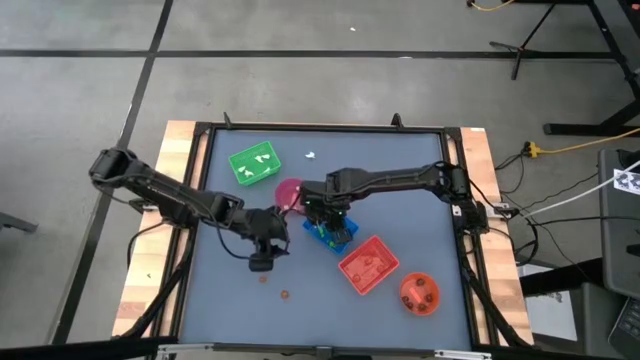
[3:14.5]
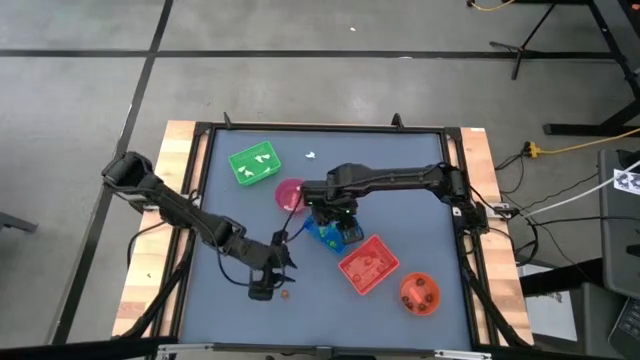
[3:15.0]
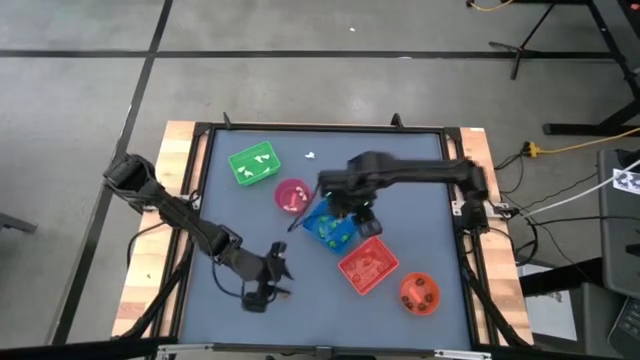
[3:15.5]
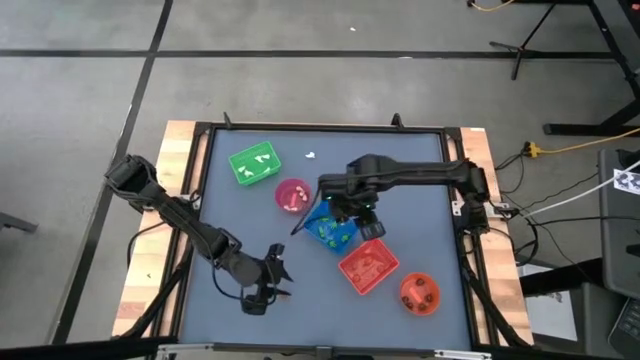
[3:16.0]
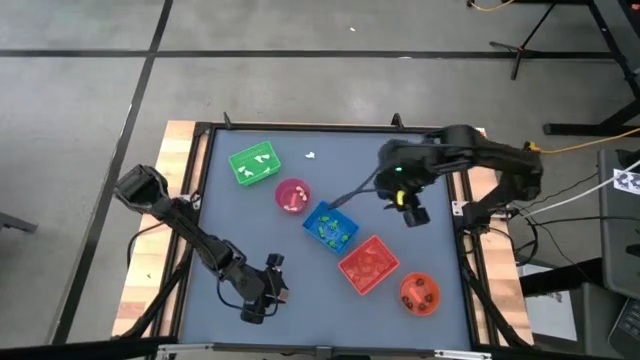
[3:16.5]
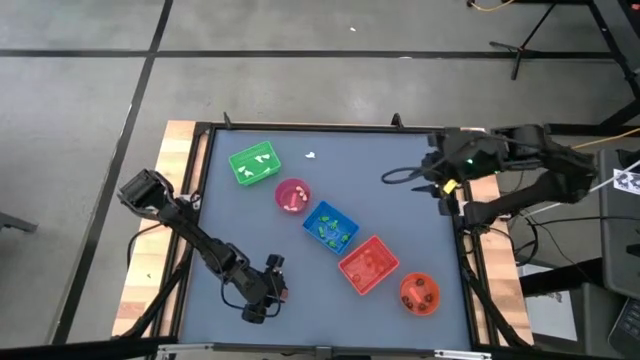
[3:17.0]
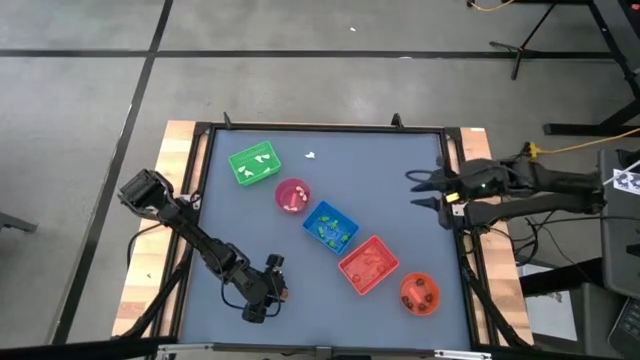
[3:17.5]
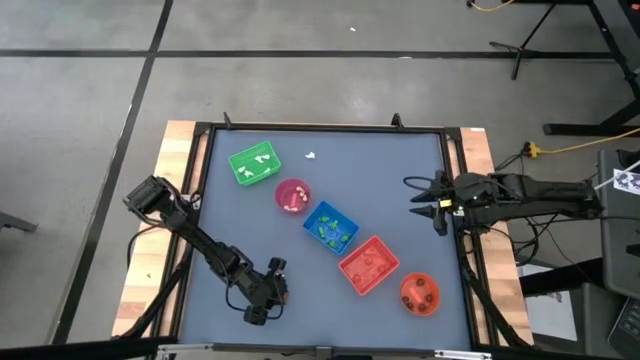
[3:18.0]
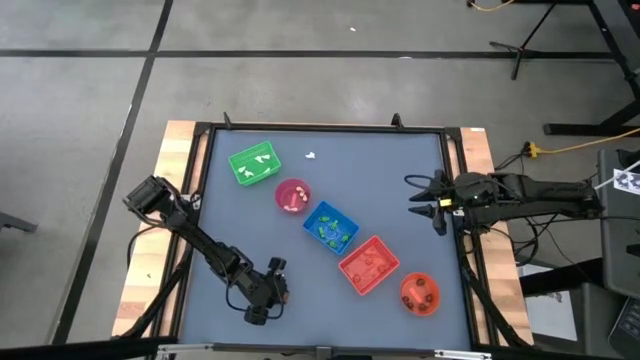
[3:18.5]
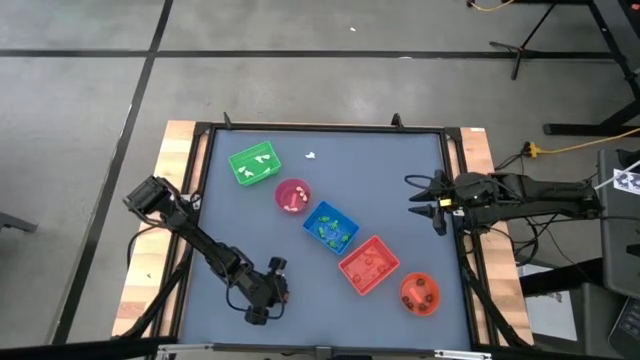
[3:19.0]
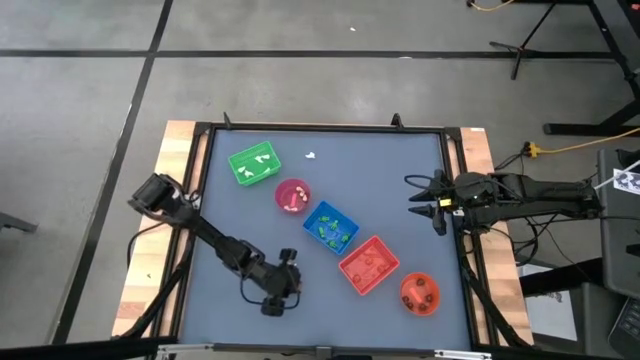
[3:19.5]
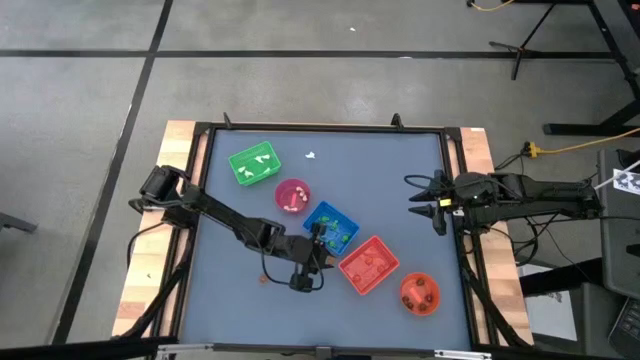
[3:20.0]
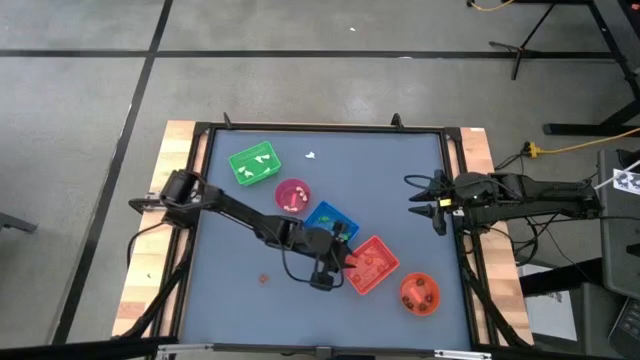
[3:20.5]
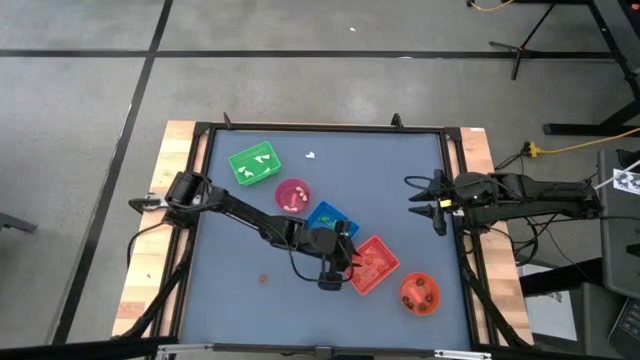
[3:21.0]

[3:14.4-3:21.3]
Task: Sort Halloween decoration
Put the orange pumpkin toy into the orange bin

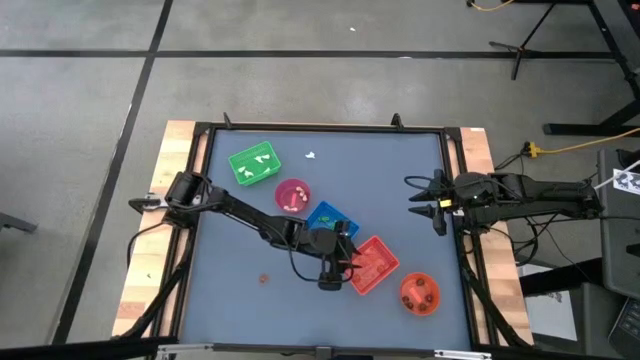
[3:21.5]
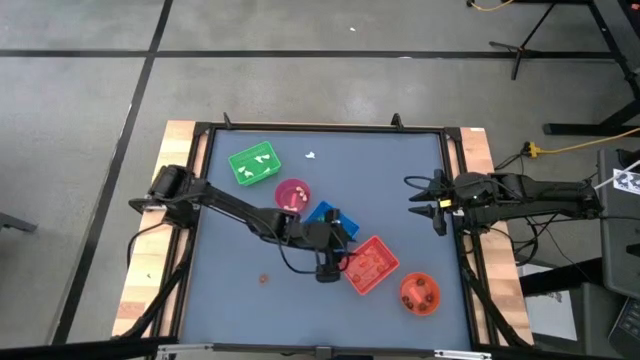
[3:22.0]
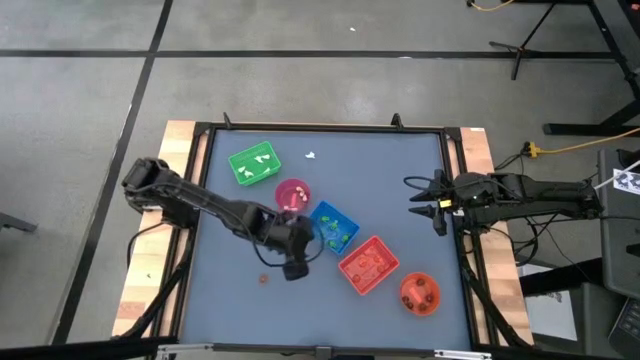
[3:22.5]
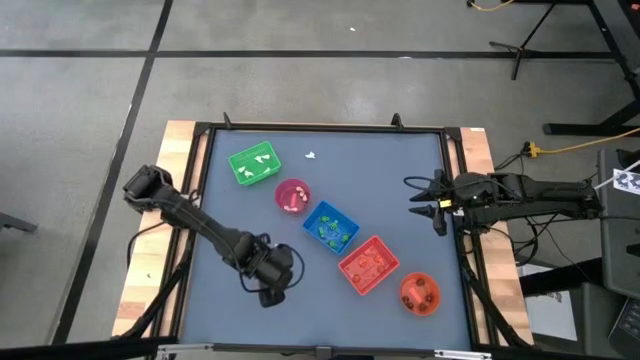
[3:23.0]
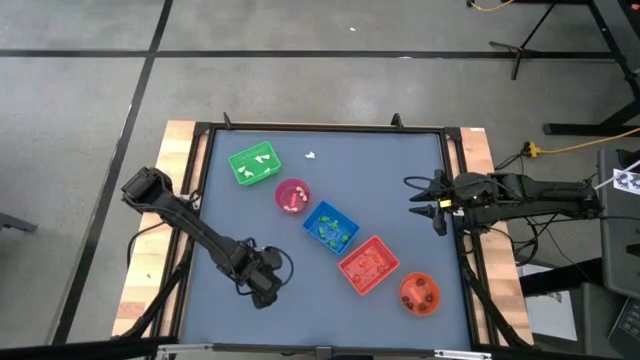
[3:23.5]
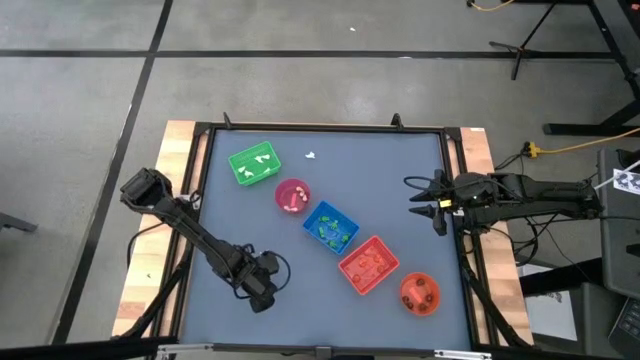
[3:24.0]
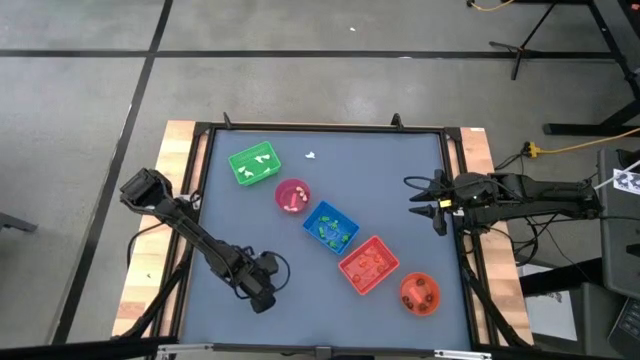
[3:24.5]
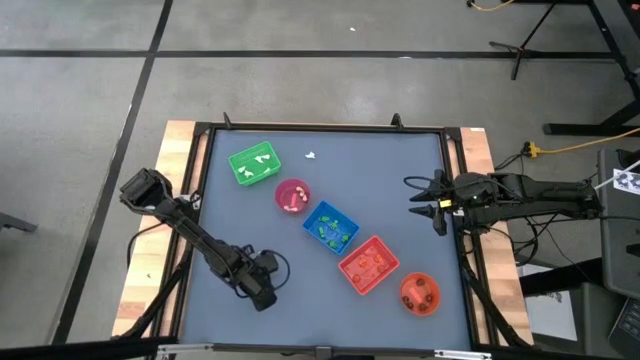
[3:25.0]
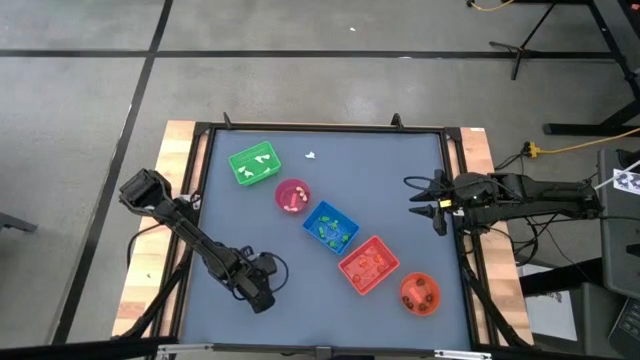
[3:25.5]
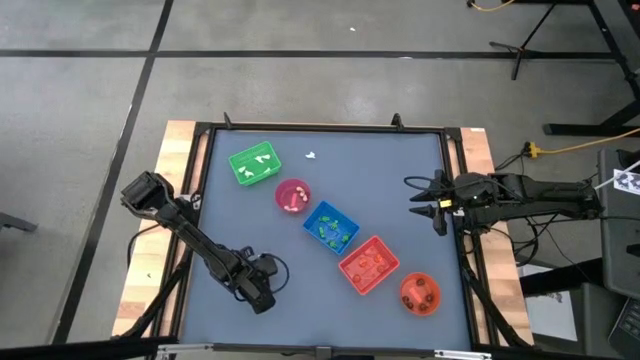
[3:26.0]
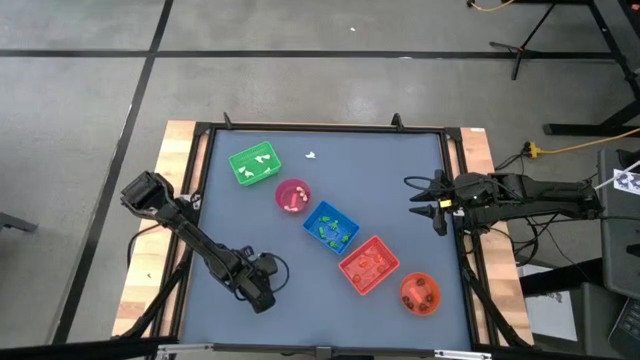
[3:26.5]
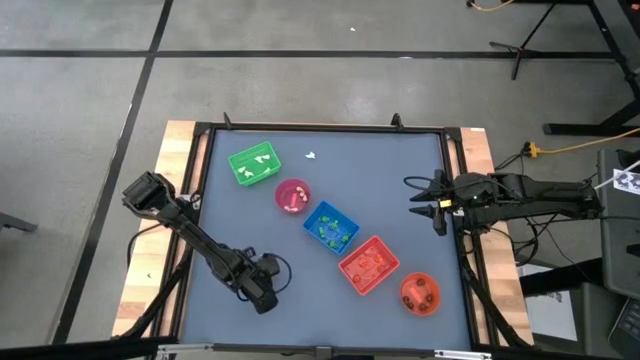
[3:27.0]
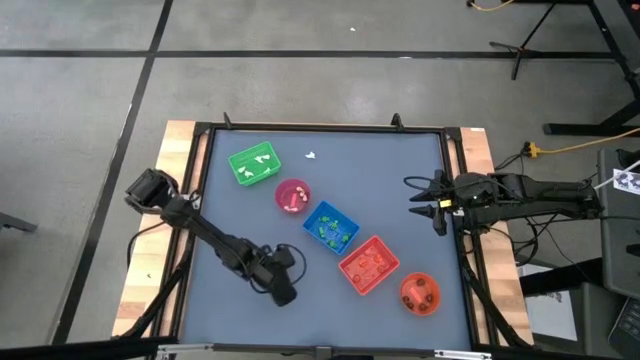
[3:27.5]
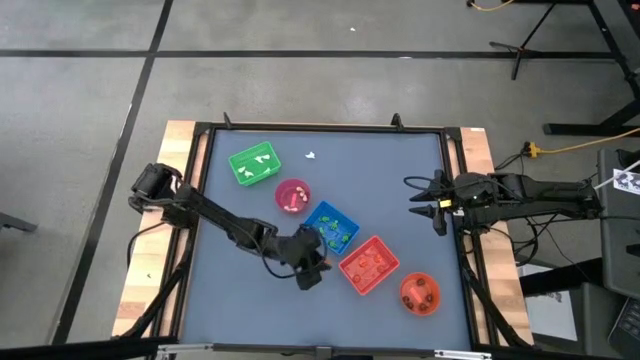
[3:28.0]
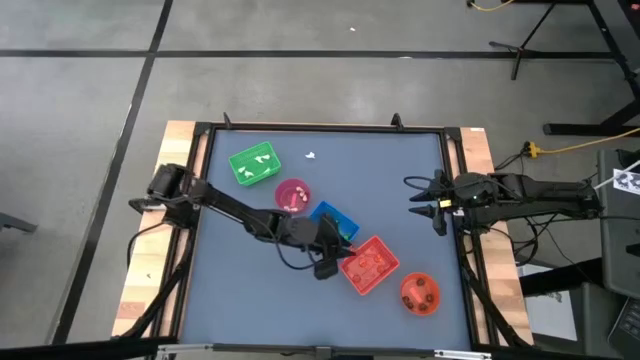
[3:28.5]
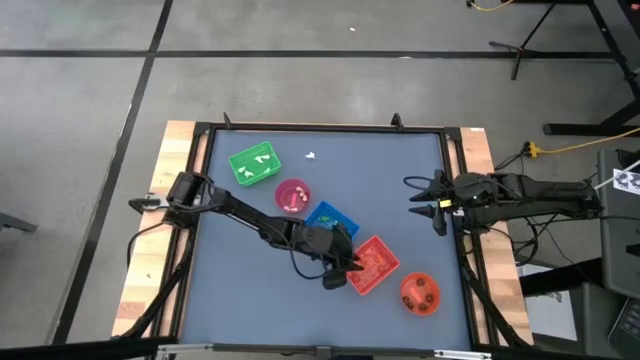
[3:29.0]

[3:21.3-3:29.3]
Put the orange pumpkin toy into the orange bin

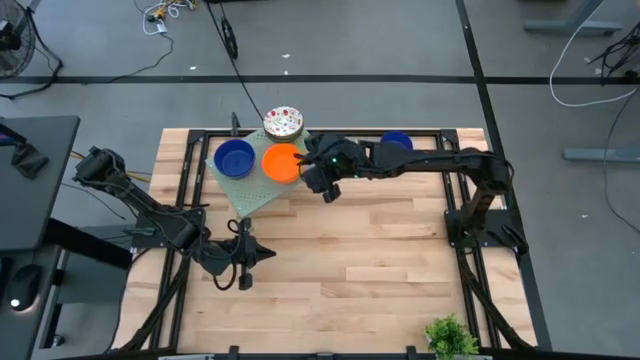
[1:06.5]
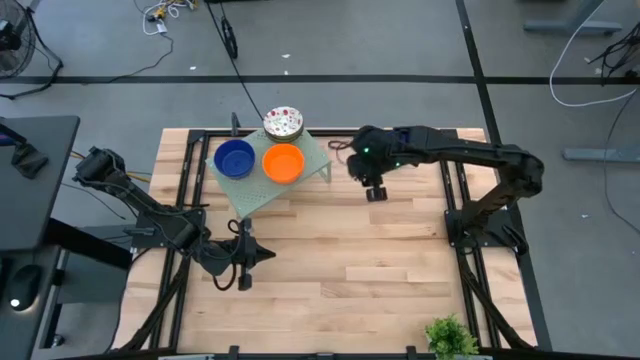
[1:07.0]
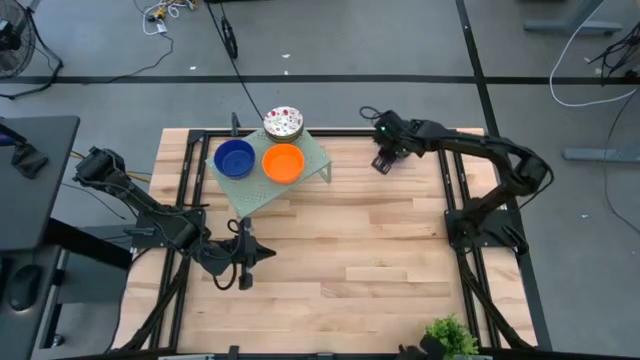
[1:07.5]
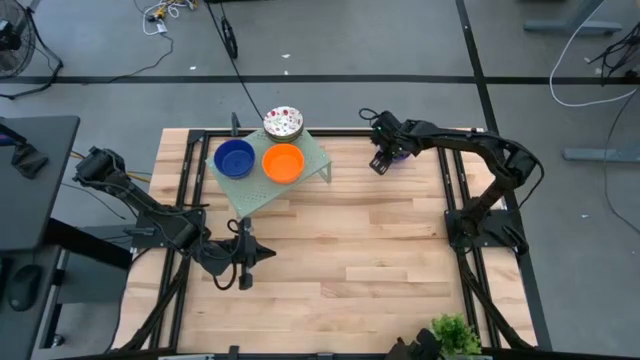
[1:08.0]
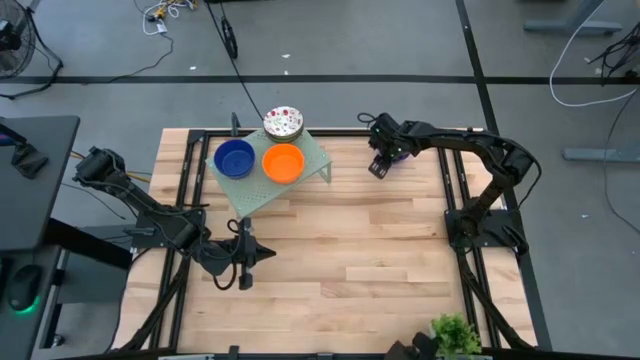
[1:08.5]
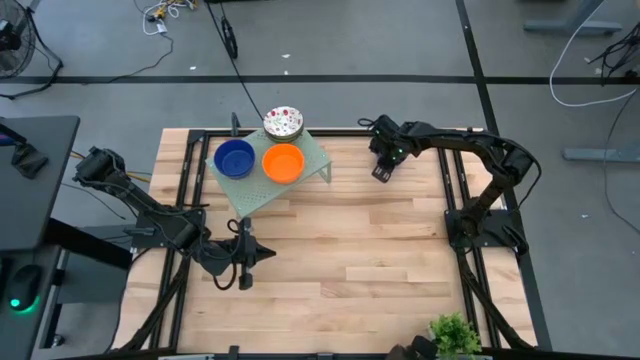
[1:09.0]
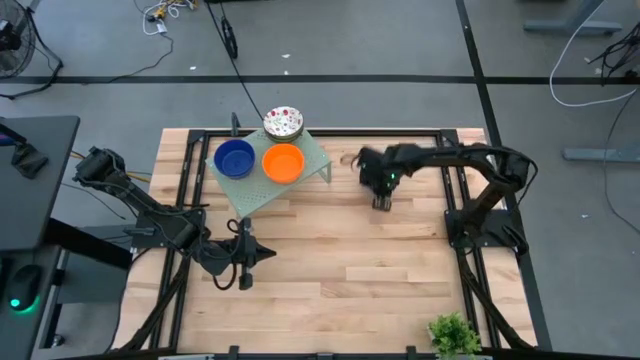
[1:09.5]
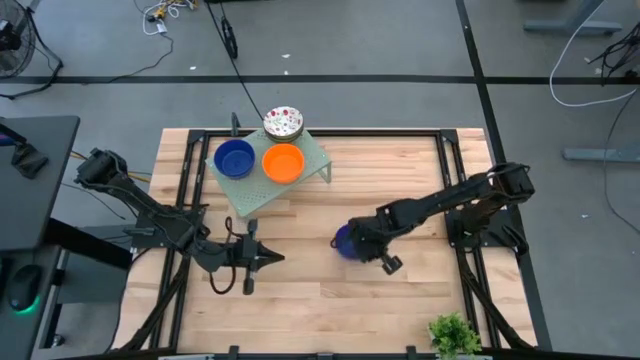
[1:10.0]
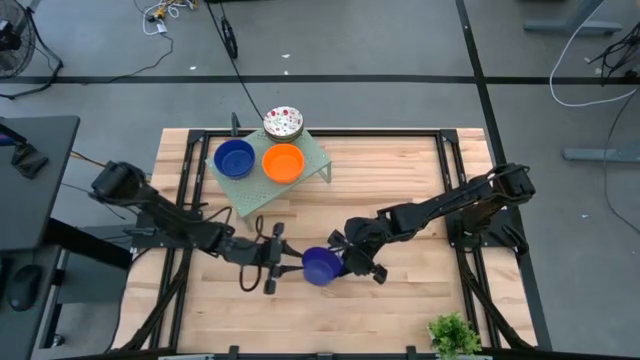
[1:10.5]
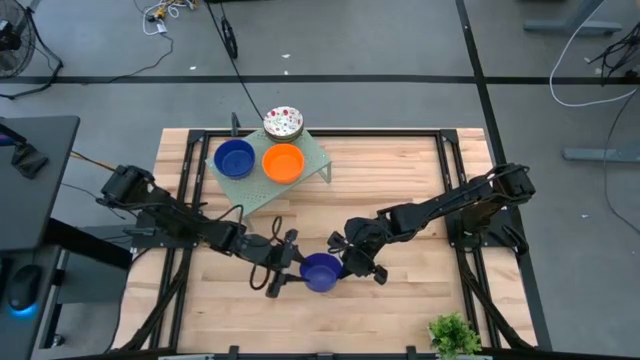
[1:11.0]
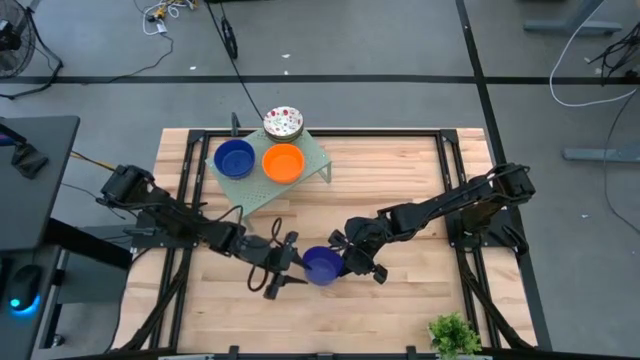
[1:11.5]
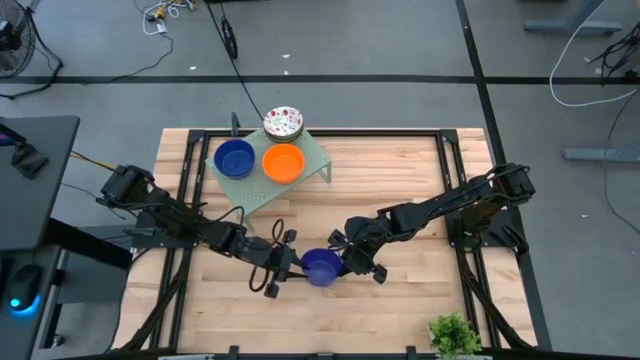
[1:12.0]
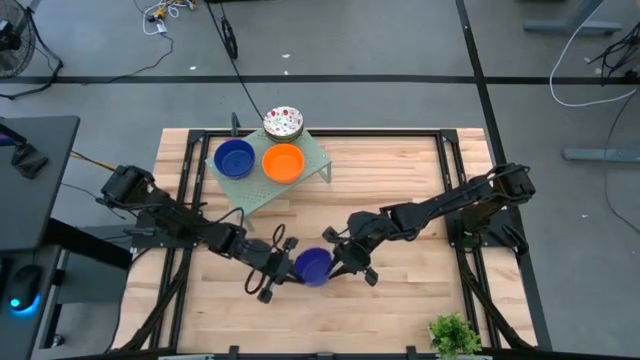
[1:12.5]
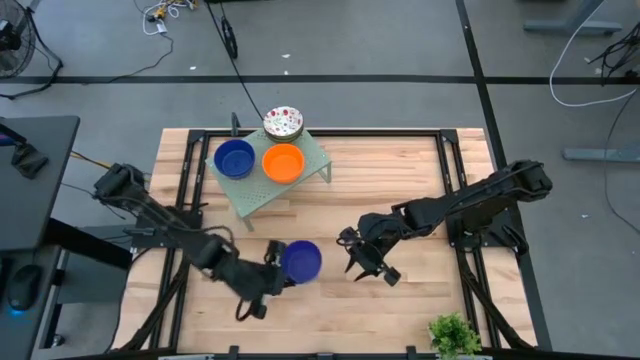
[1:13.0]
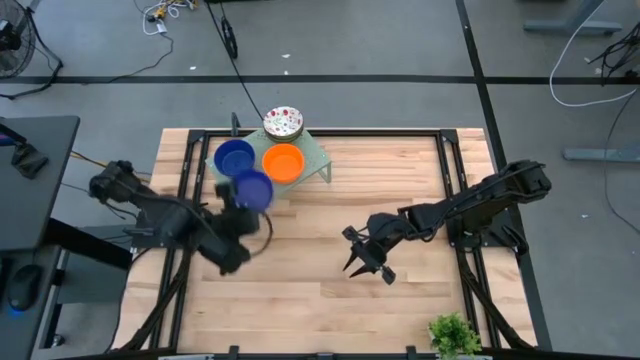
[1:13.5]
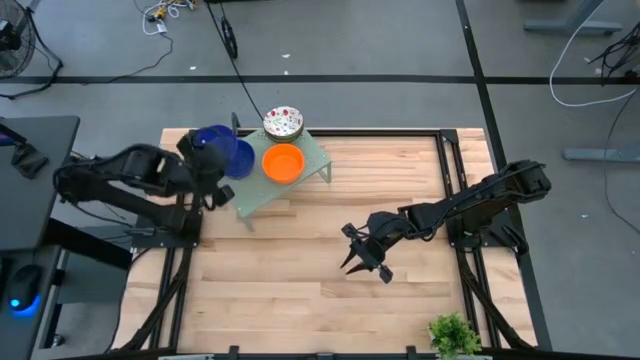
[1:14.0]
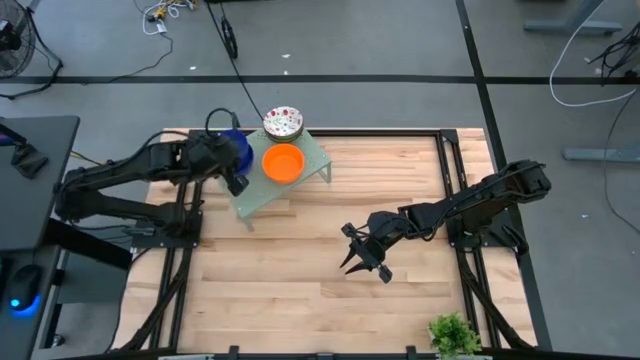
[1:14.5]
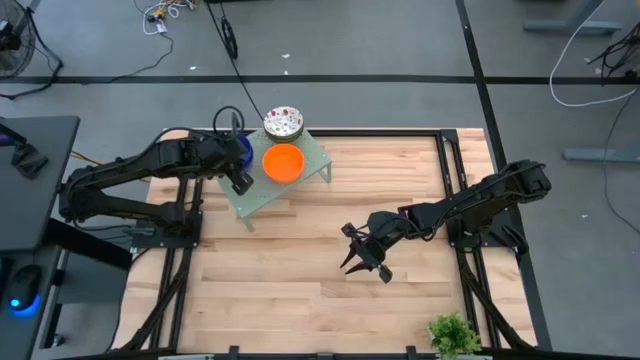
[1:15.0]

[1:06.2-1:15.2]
Task: Pick & Place Mini bowls
Stack the blue bowl on the blue bowls on the shelf
